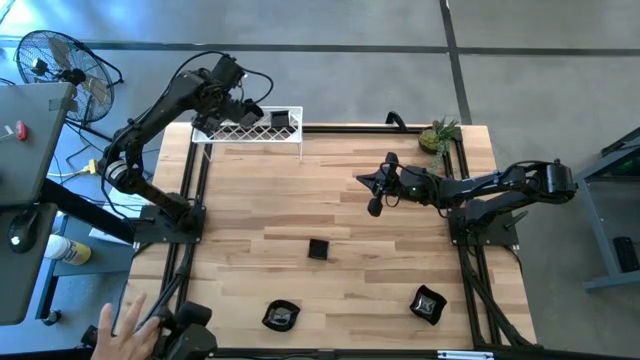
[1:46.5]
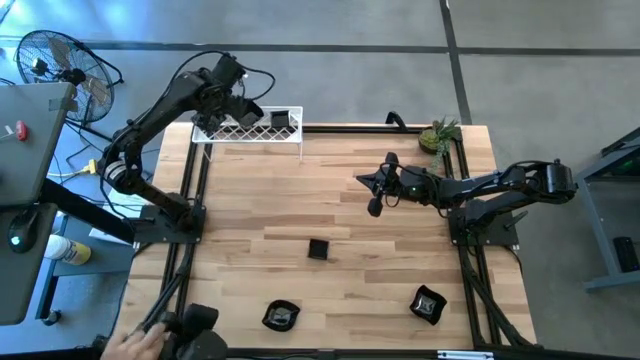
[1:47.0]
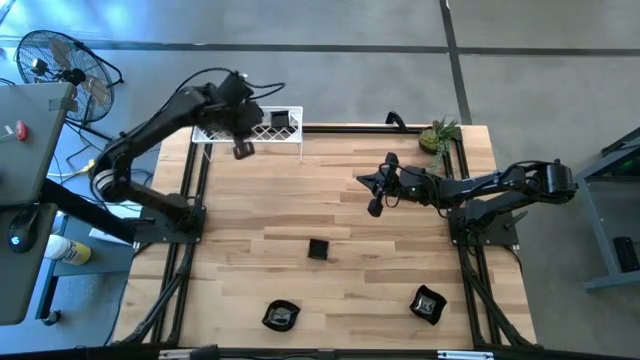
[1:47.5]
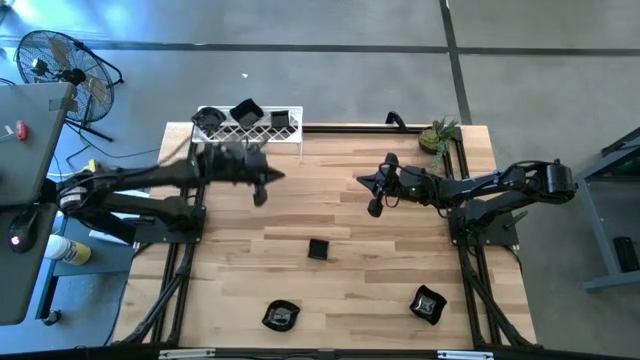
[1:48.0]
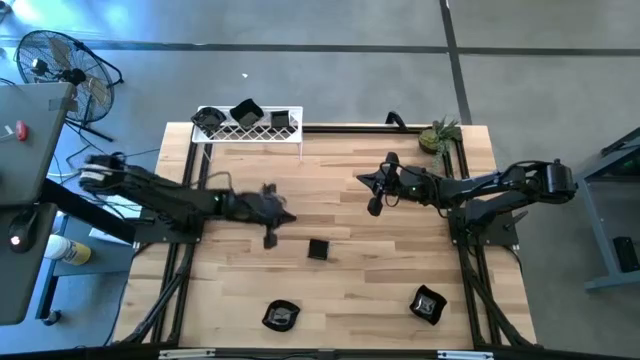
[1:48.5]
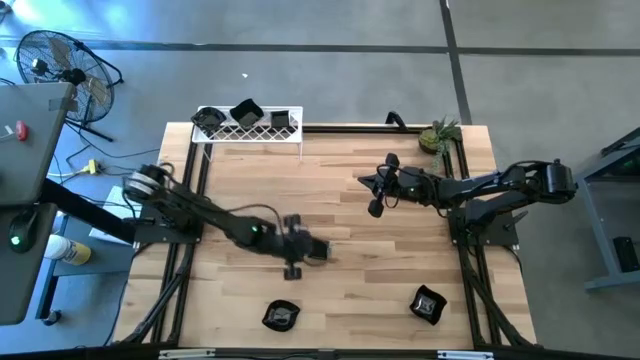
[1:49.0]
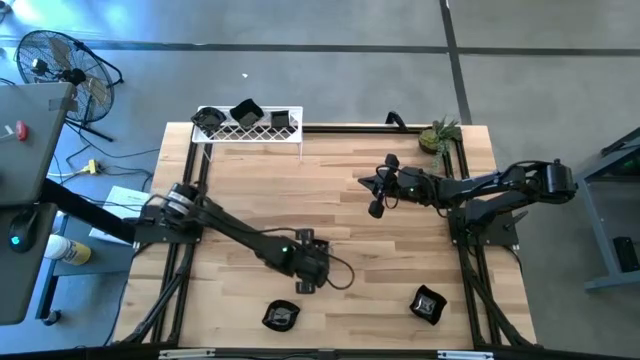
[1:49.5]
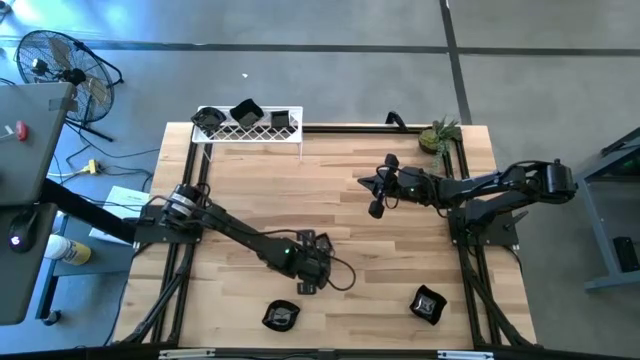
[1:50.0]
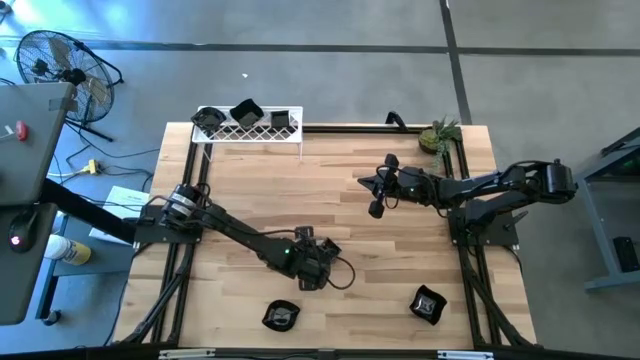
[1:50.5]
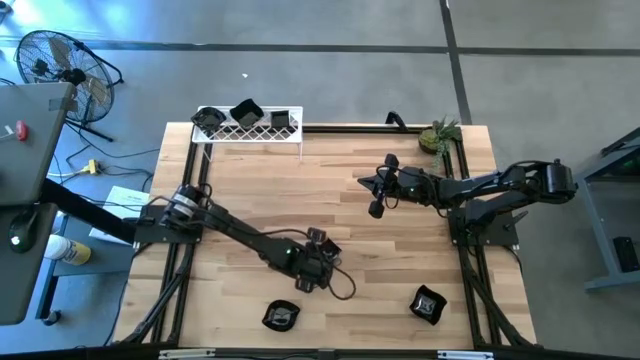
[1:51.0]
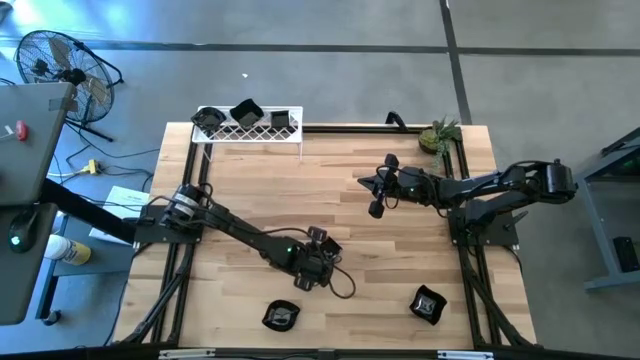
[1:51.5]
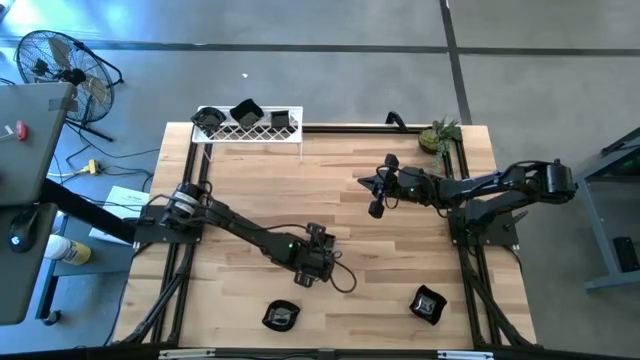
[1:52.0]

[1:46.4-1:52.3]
Task: Pick & Place Mini shaped plates
Stack the black square plate on top of the black square plate on the shelf

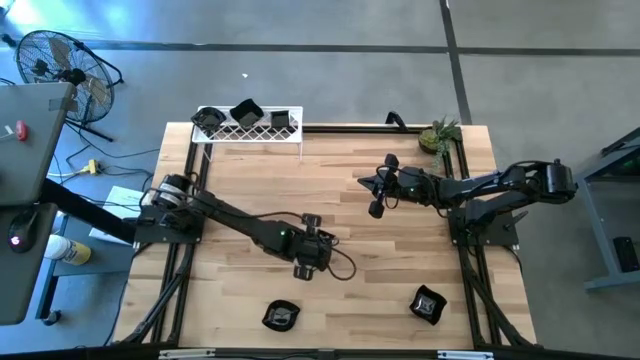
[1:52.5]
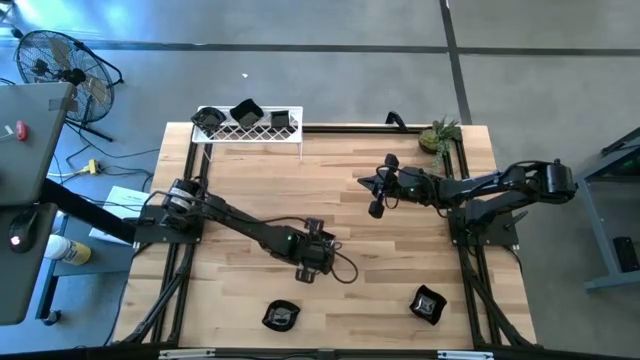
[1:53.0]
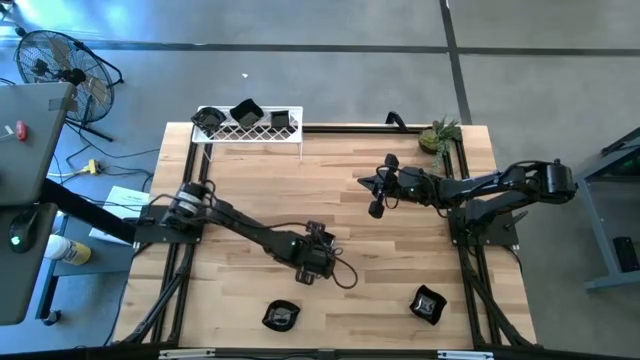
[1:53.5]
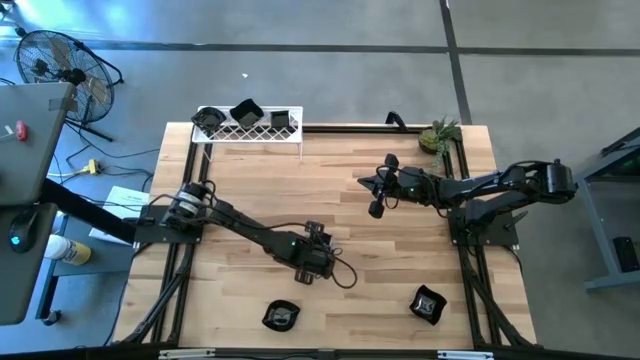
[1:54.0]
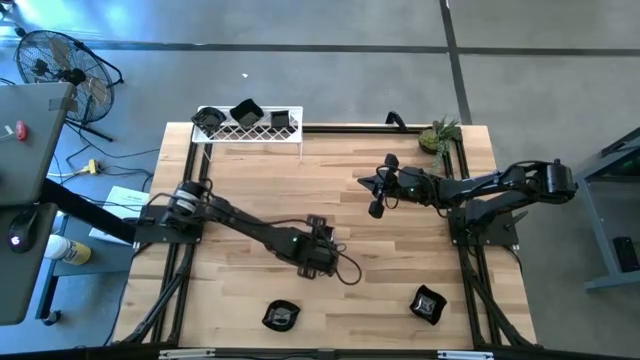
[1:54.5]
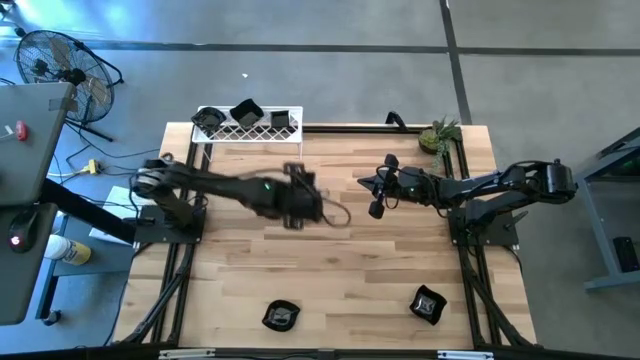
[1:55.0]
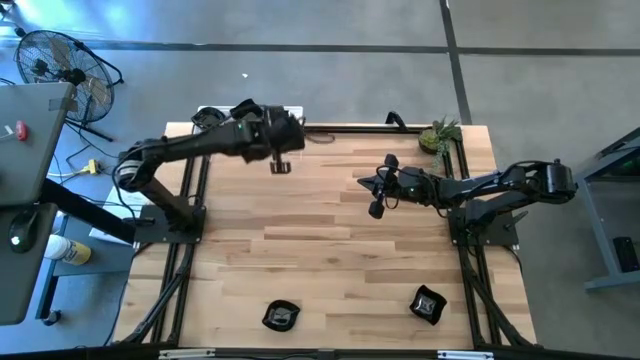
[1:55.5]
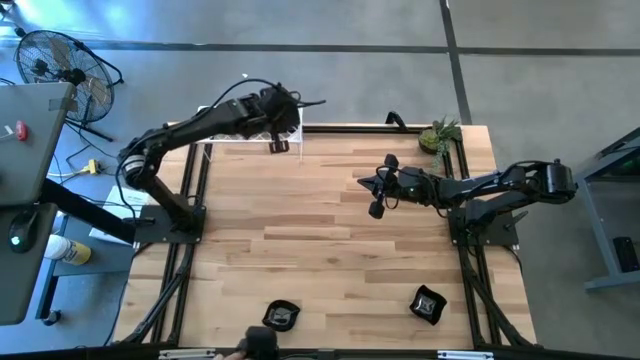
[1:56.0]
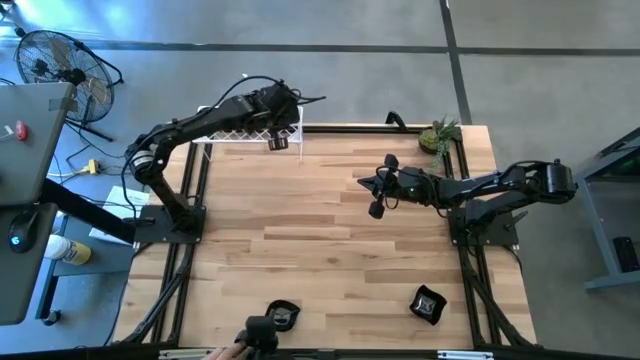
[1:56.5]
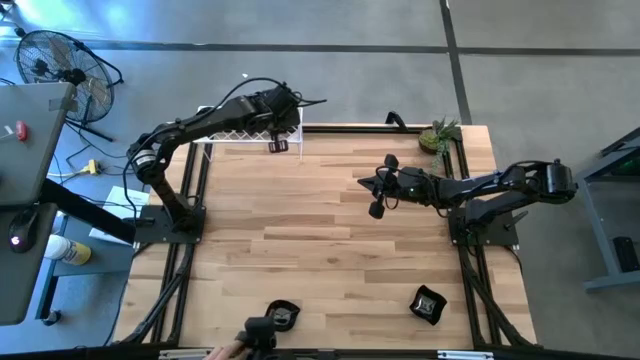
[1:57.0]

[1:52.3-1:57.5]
Stack the black square plate on top of the black square plate on the shelf

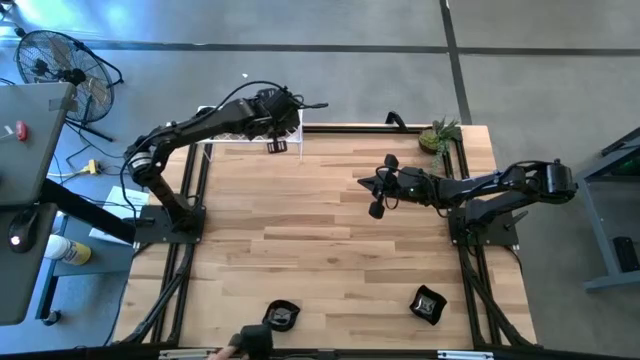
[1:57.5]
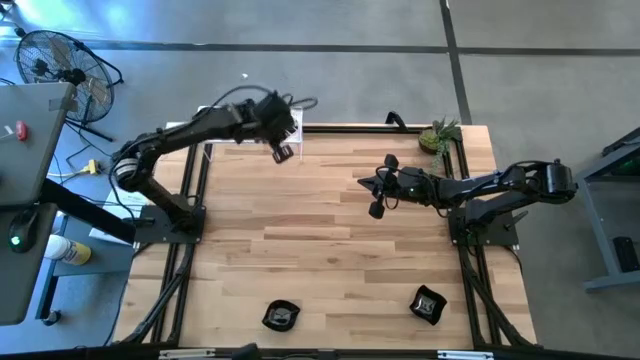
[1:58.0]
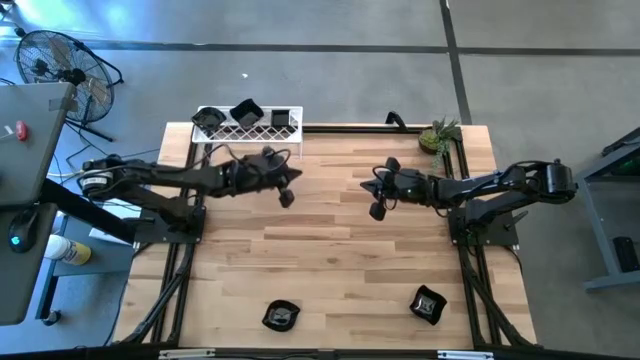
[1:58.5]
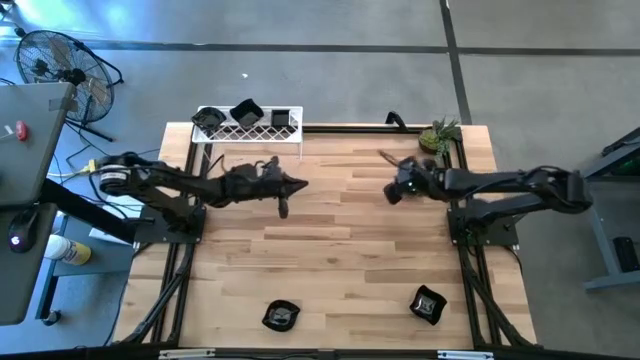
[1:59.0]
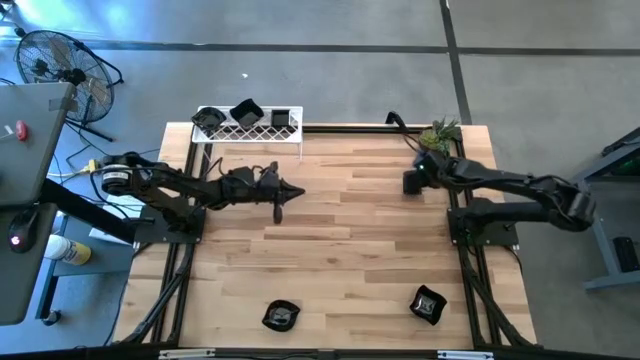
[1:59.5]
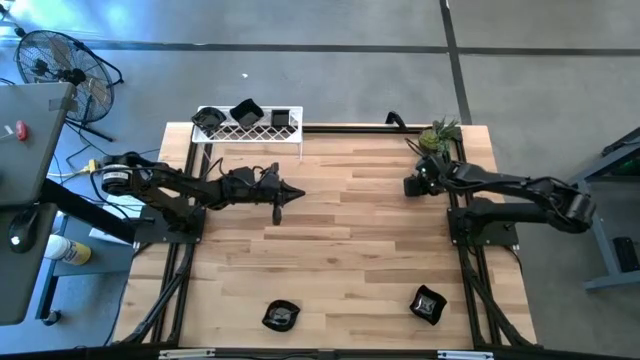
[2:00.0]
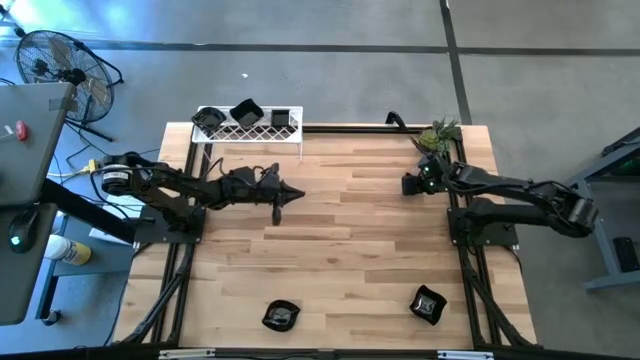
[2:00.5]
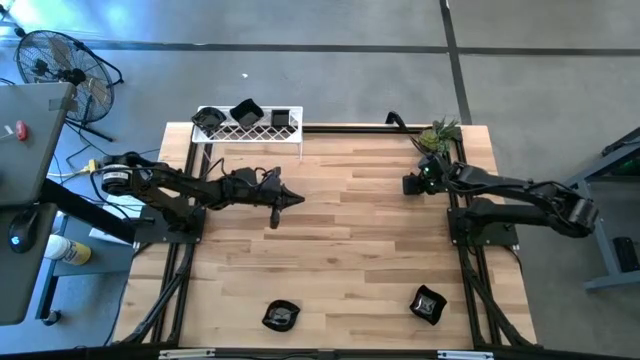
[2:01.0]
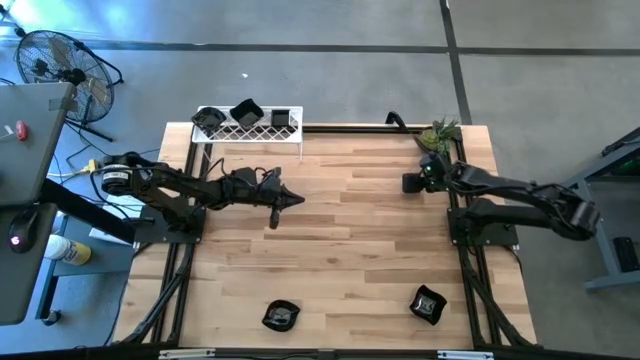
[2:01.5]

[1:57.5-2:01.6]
Stack the black square plate on top of the black square plate on the shelf

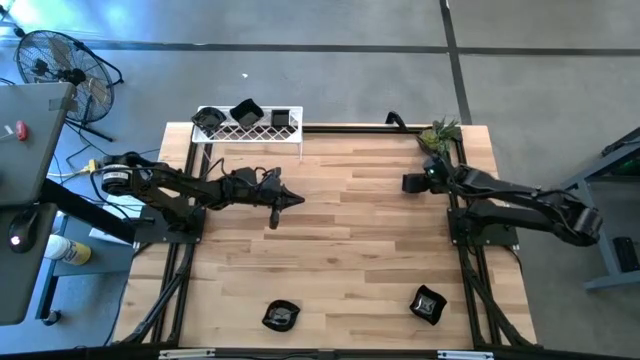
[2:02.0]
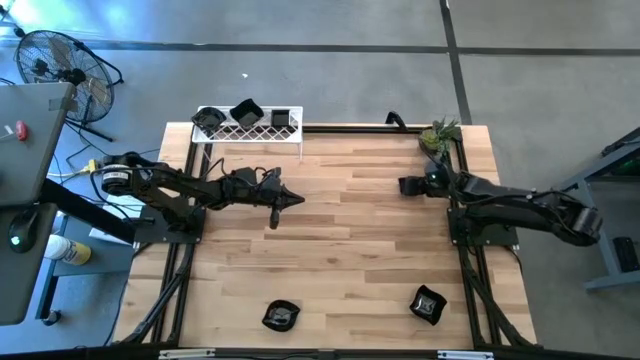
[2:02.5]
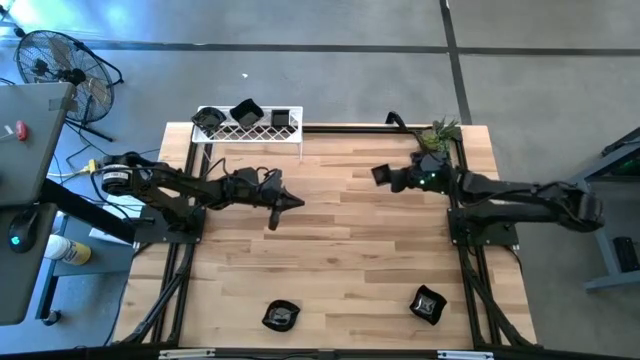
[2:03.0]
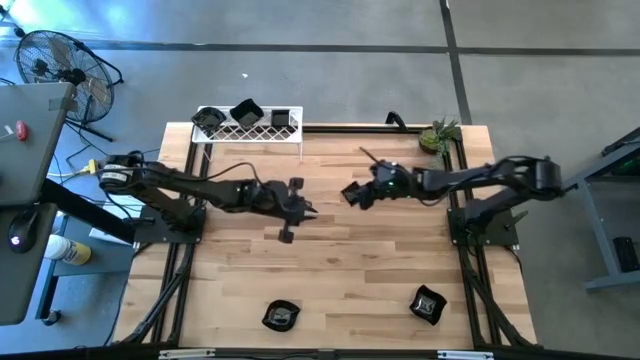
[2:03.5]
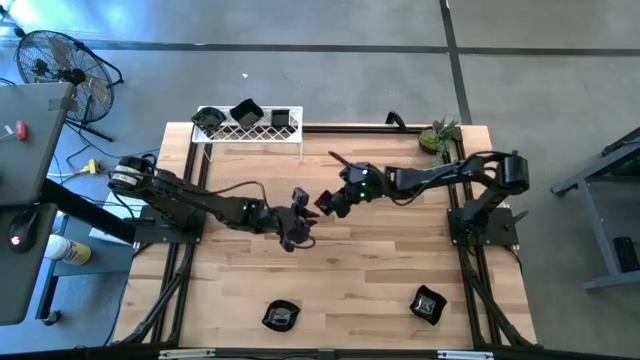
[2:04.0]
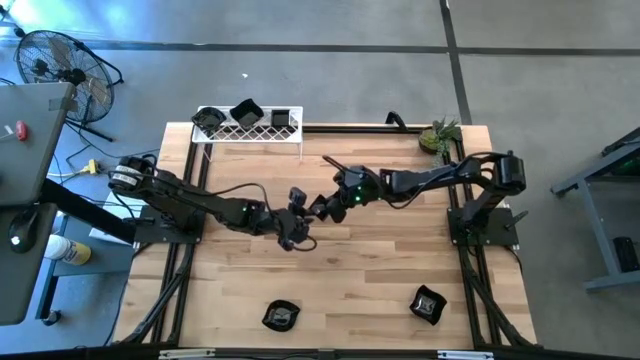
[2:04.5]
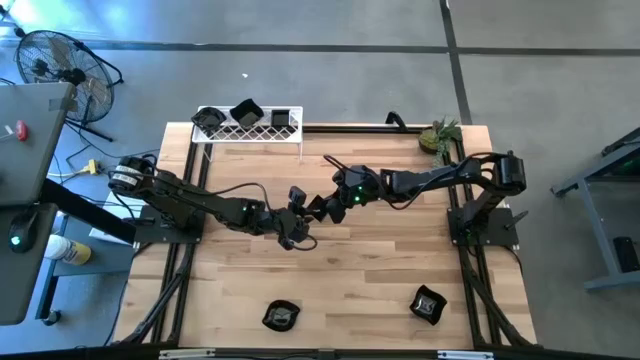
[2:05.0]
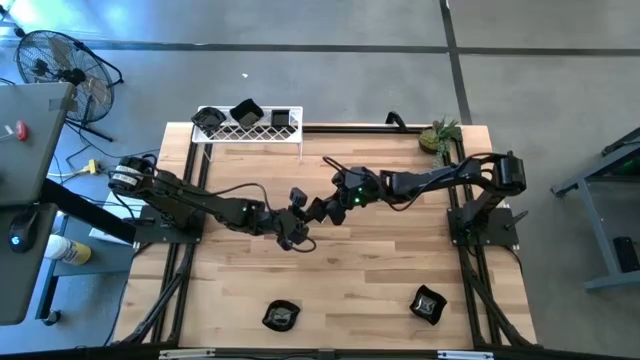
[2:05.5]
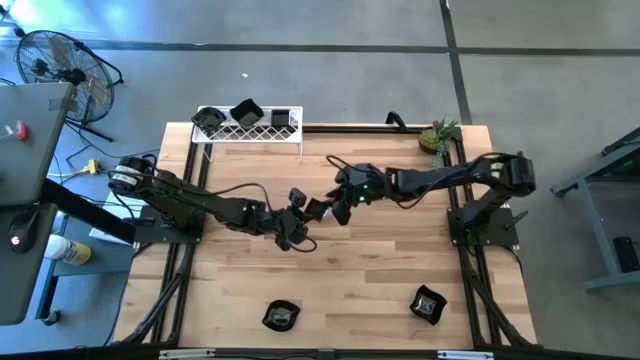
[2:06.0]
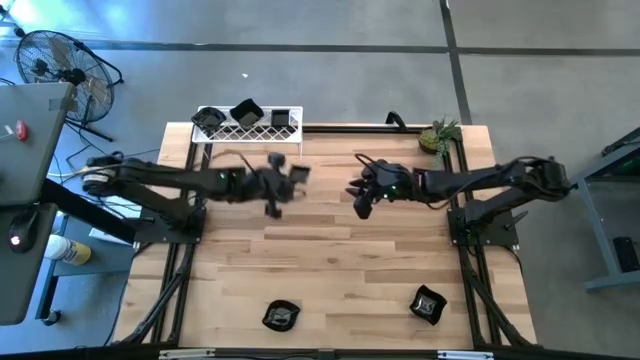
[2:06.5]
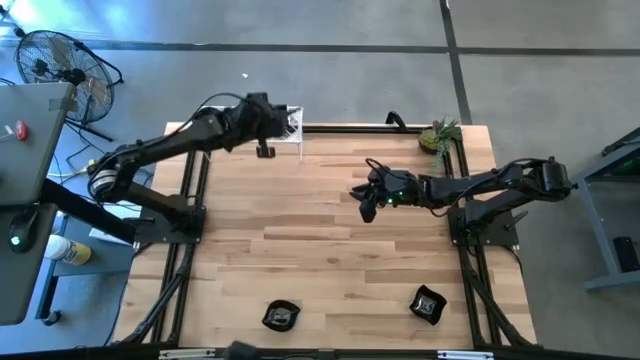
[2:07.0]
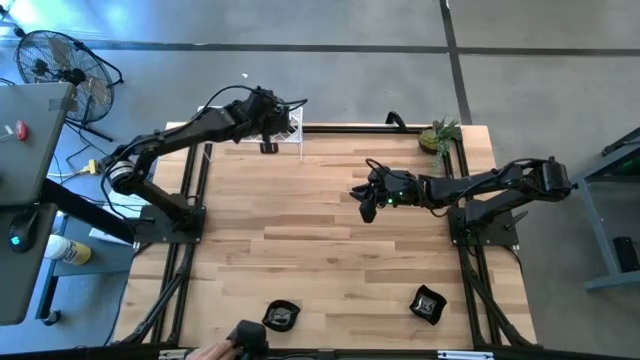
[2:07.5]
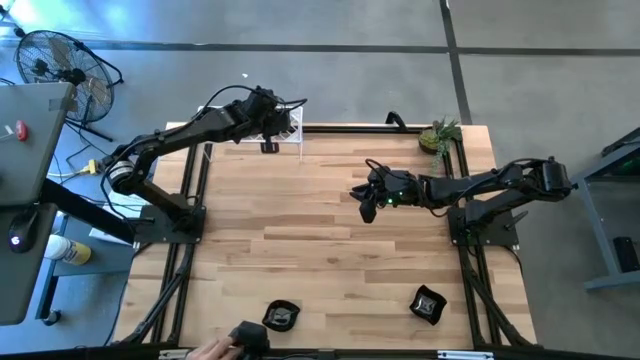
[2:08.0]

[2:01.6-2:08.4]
Stack the black square plate on top of the black square plate on the shelf
